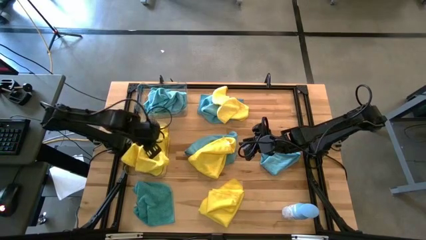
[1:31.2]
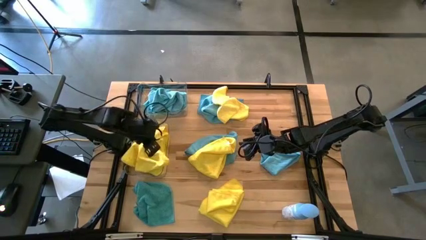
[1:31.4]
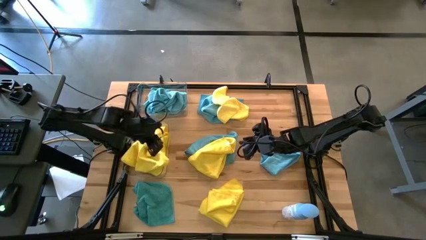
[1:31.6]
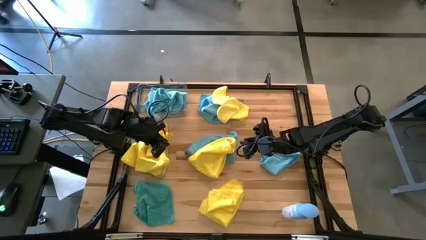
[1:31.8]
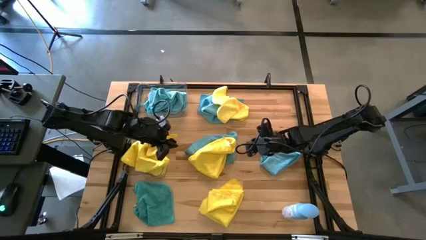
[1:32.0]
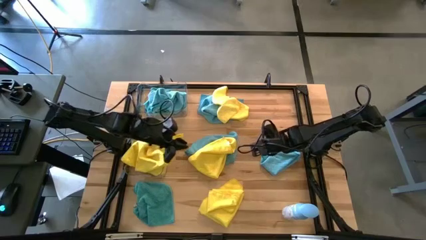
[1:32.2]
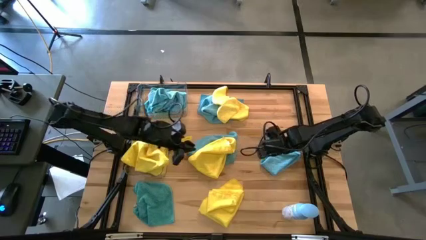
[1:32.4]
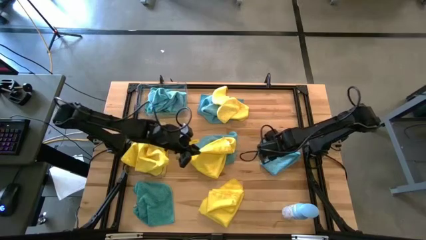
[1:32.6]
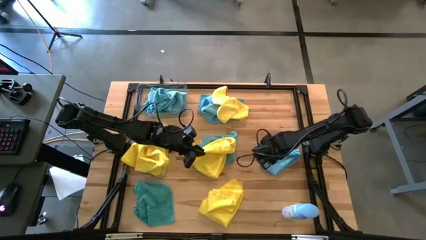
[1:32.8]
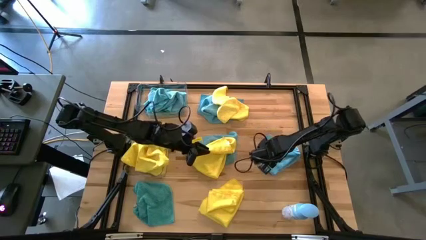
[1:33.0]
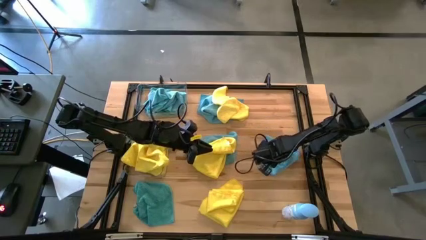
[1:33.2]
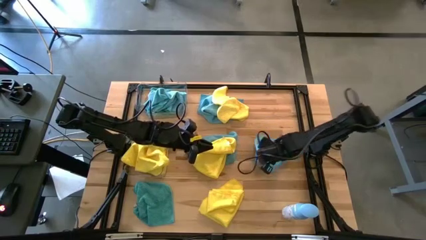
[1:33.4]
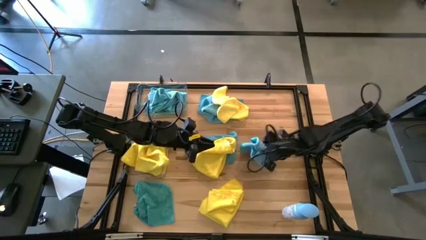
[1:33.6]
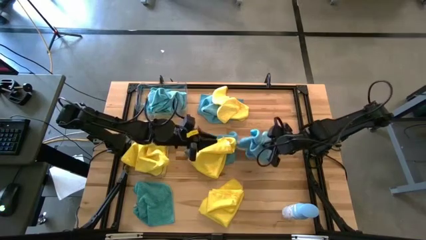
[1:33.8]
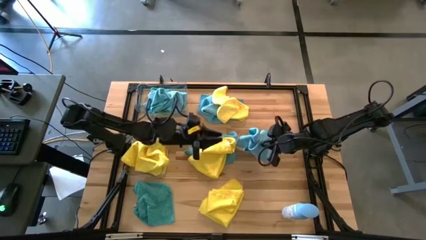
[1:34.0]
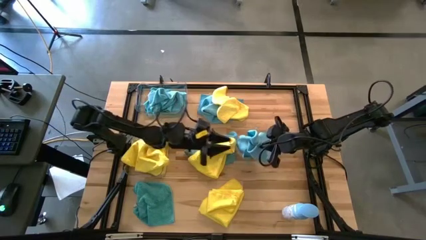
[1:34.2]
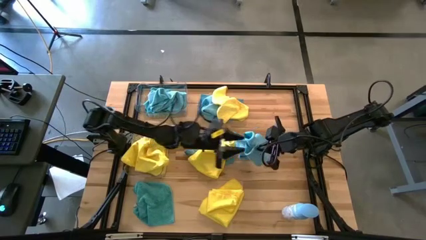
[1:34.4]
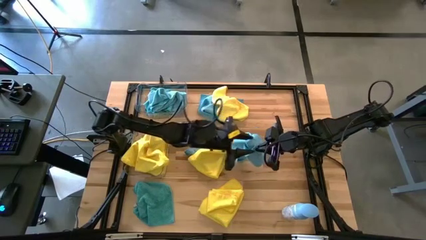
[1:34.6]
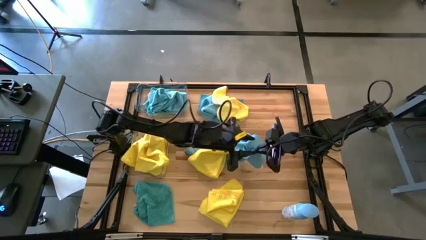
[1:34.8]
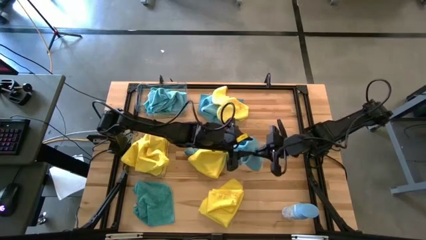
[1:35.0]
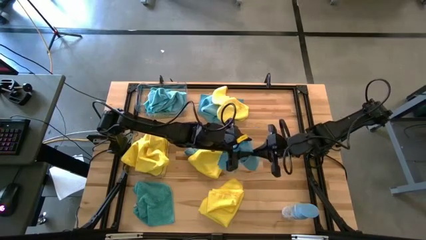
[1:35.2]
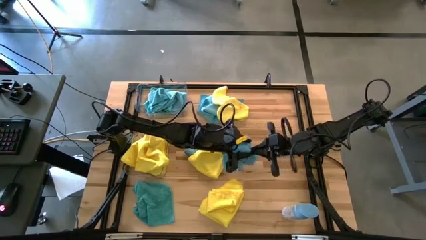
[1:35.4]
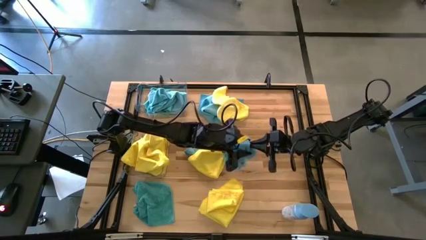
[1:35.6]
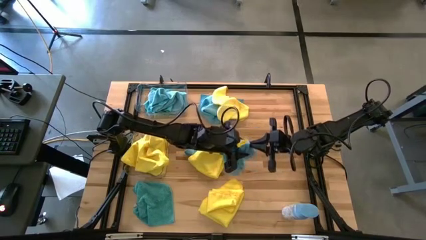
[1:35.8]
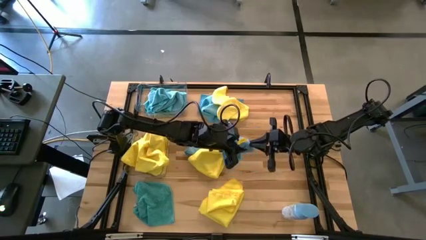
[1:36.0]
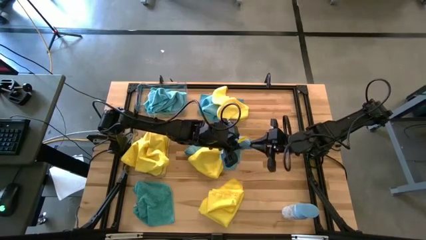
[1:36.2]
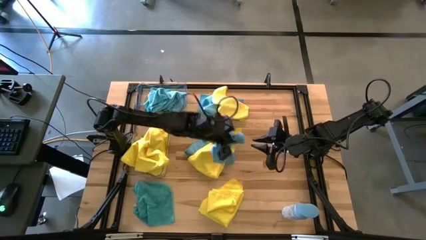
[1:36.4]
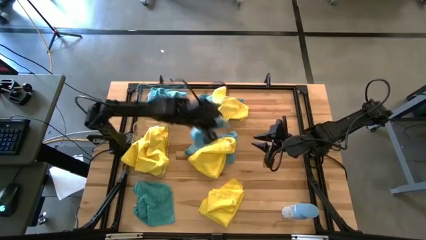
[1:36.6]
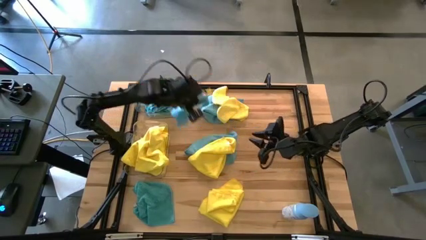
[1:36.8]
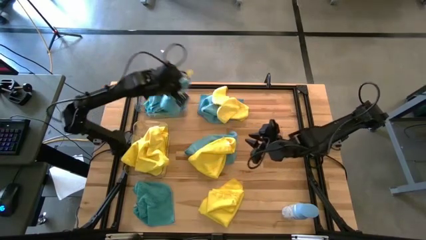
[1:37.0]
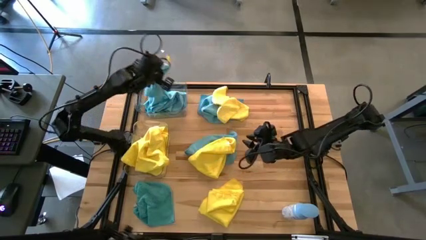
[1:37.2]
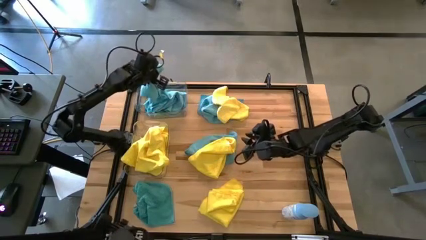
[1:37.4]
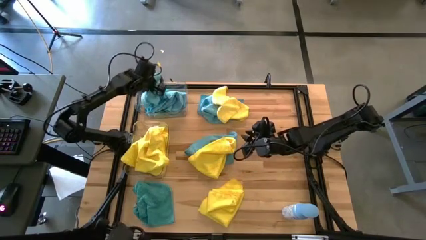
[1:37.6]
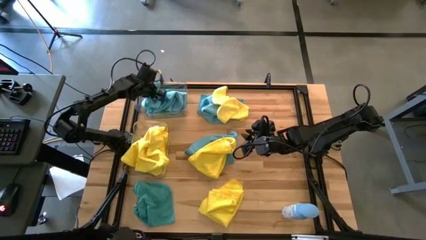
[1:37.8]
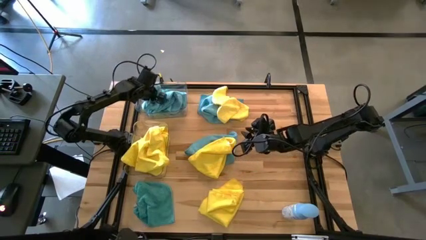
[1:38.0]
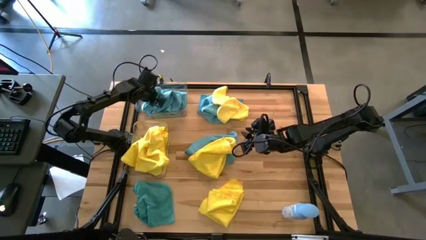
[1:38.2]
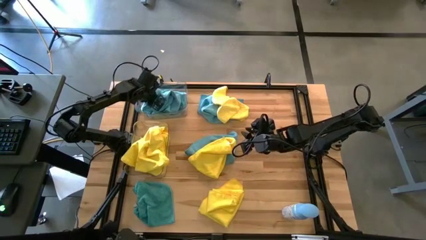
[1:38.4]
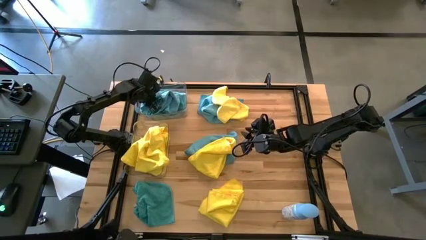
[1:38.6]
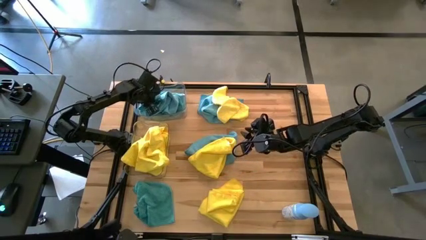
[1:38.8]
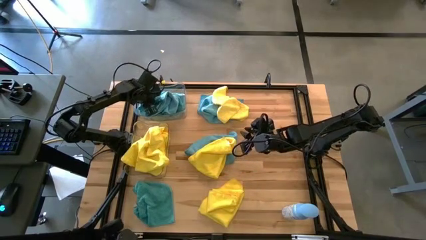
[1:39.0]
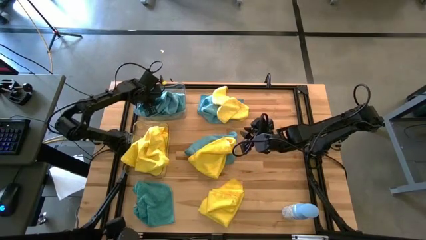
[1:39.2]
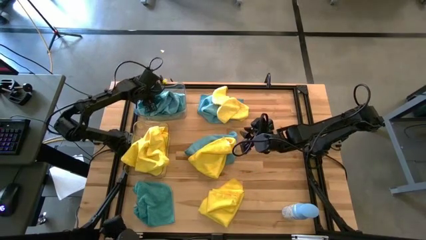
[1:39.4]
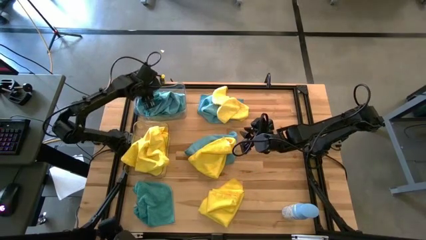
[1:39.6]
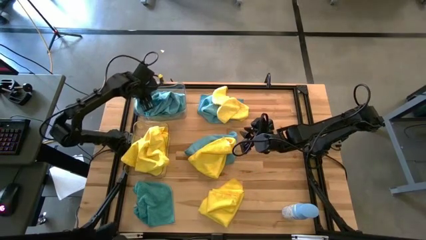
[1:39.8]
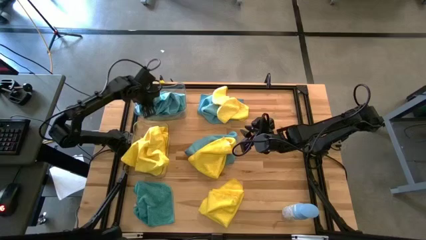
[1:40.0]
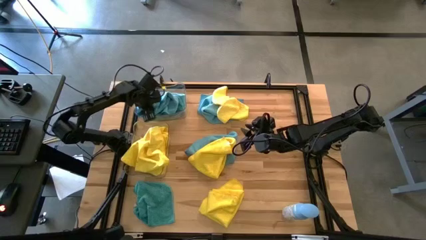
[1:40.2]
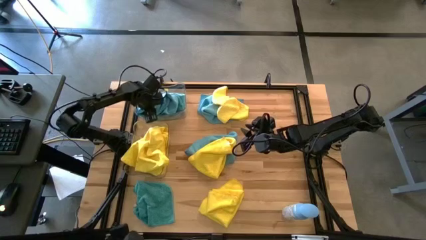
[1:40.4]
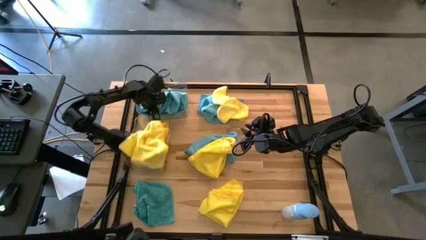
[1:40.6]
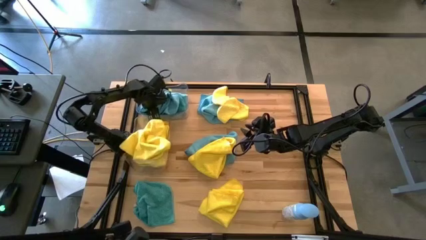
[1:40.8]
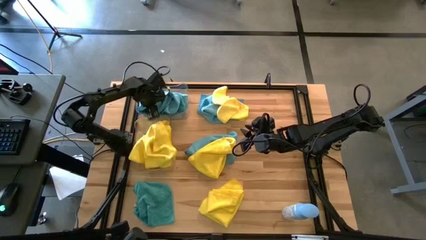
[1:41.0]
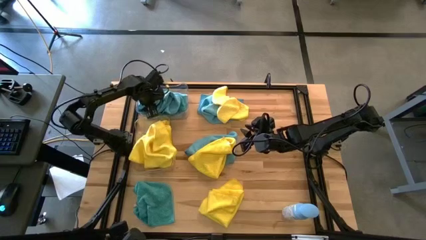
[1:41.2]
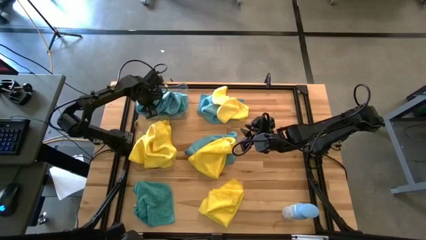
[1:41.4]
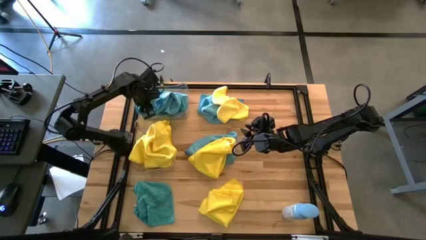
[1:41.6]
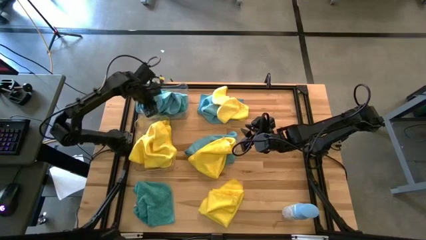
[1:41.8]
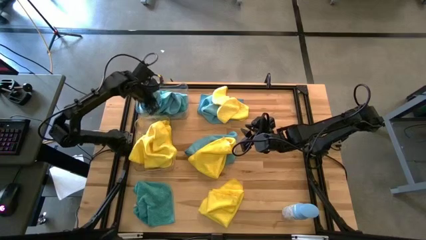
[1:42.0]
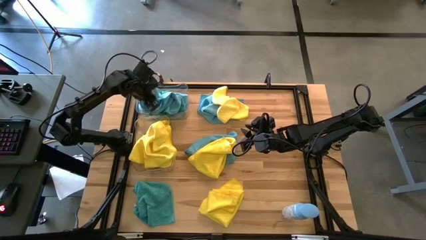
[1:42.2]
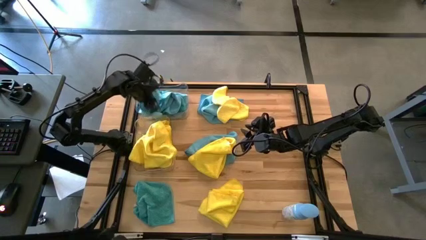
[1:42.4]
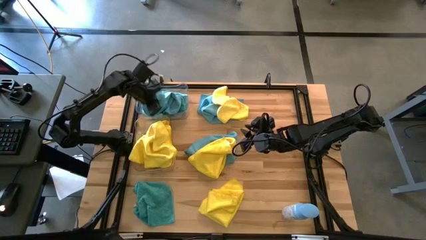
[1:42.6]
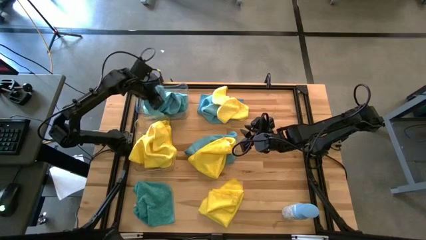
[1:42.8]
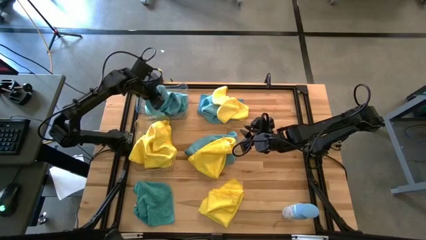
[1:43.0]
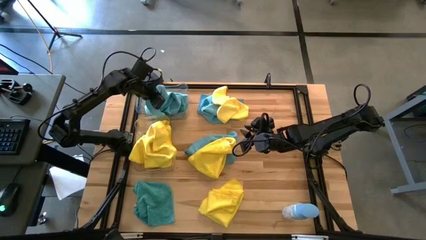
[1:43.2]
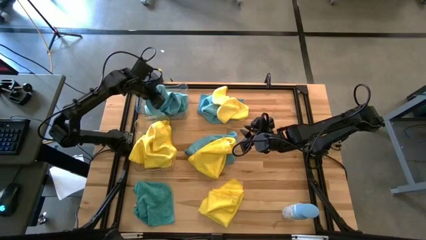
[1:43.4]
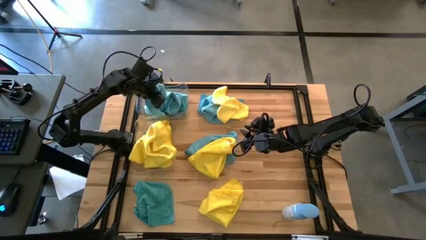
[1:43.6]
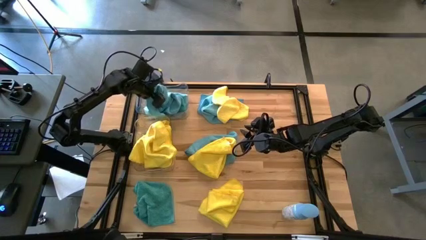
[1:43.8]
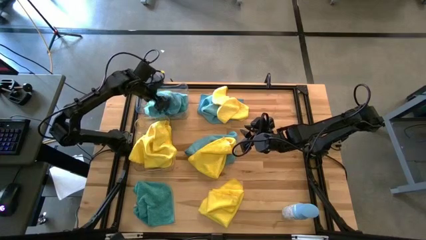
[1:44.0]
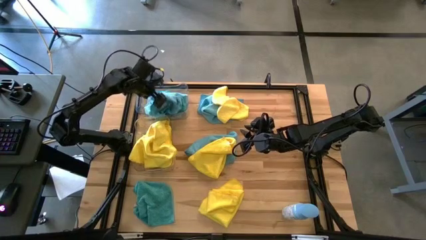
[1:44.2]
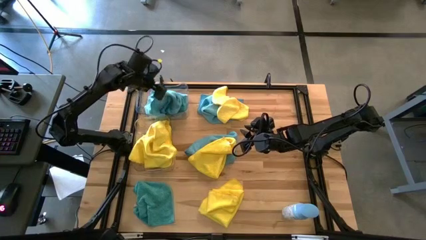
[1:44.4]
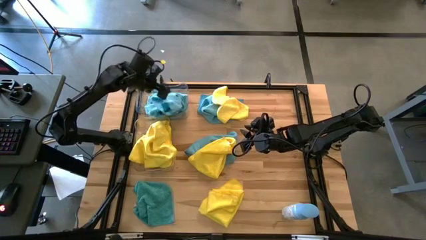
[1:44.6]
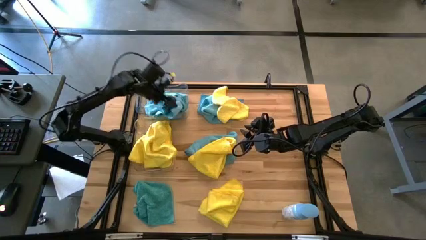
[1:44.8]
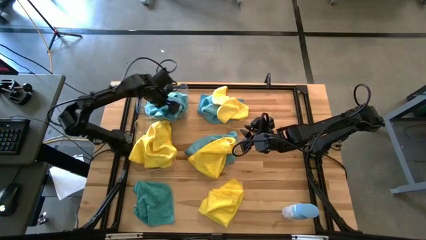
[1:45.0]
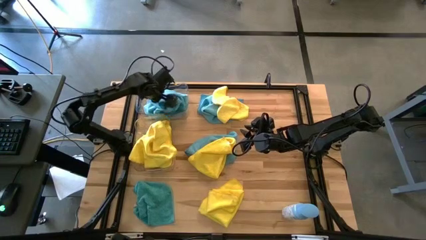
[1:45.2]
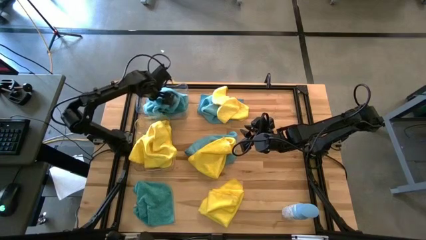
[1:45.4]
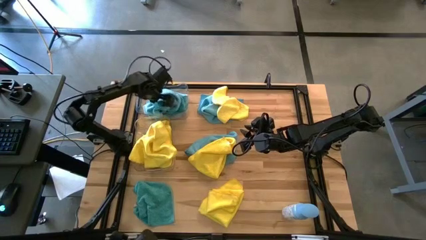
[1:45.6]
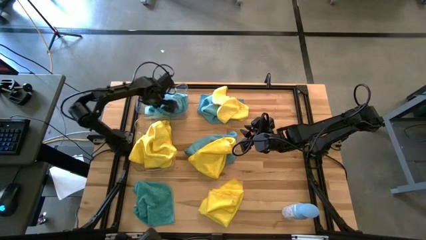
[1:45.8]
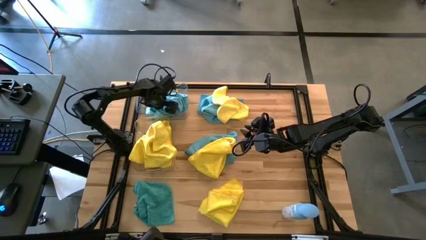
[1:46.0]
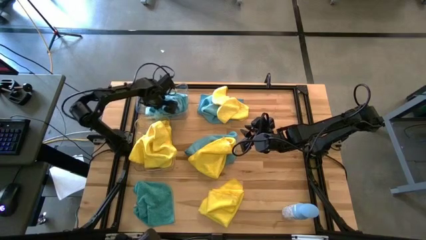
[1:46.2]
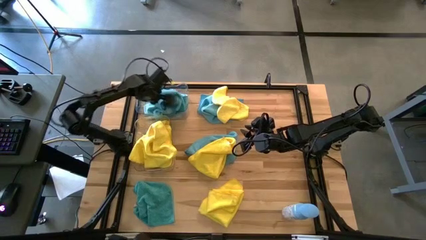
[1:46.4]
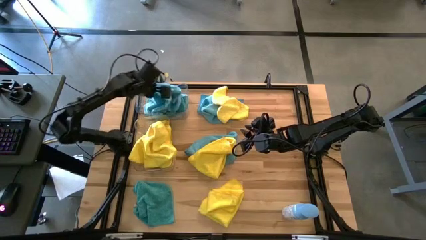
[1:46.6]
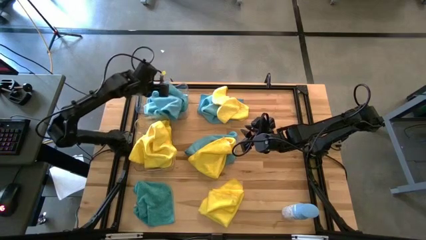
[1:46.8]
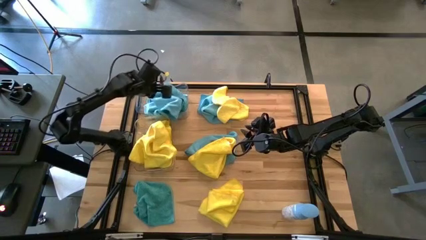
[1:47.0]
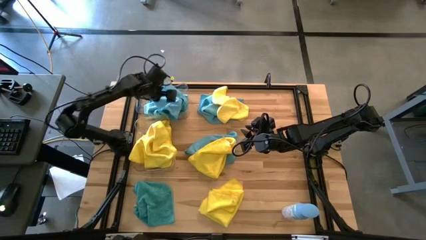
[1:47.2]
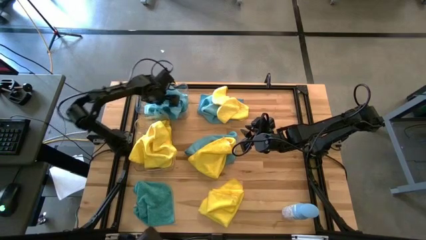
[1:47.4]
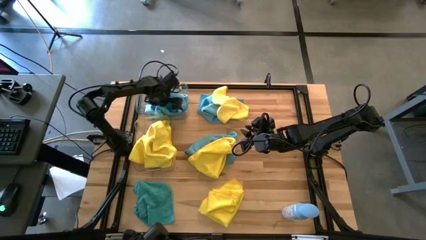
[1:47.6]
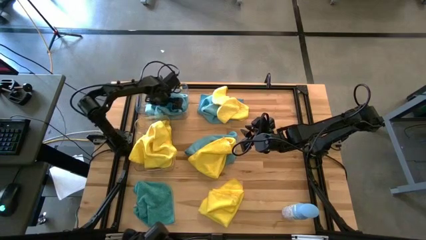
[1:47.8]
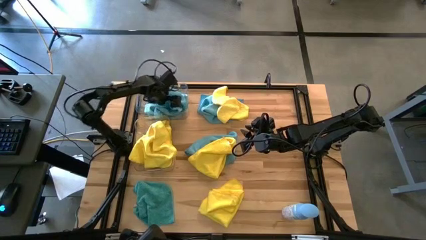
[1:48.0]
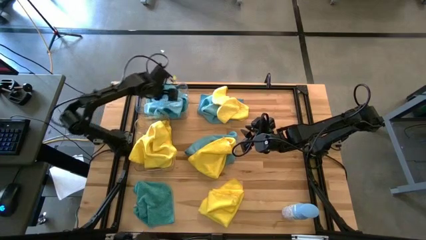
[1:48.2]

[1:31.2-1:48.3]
Task: Sort microfiber towel by color & place in baskets
Put the blue microfiber cloth into the top transparent bin
